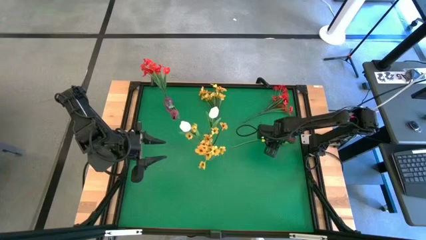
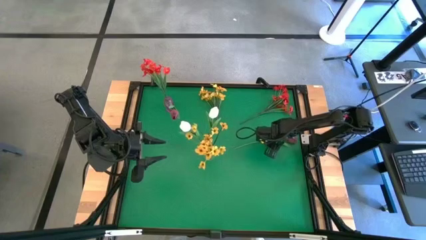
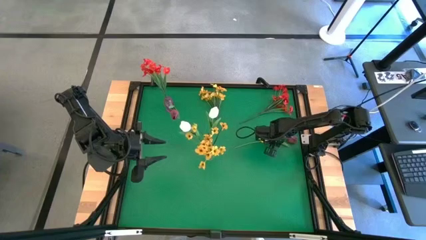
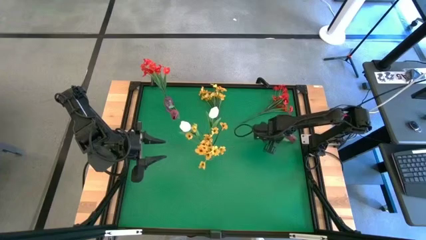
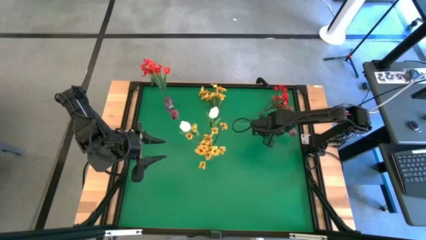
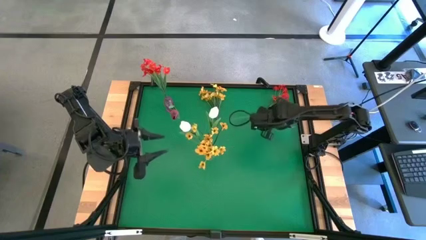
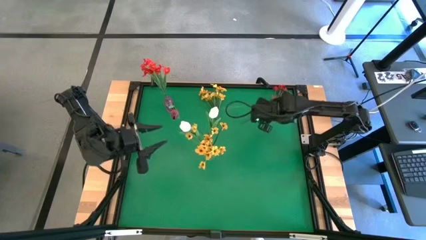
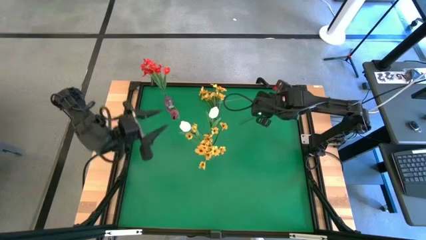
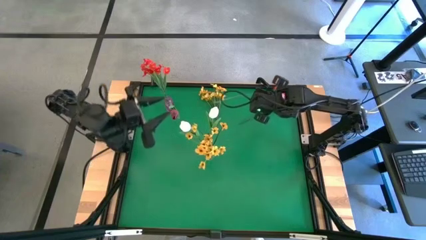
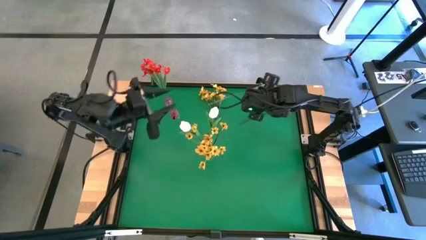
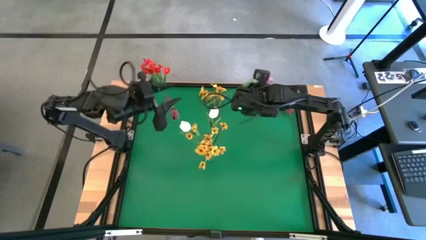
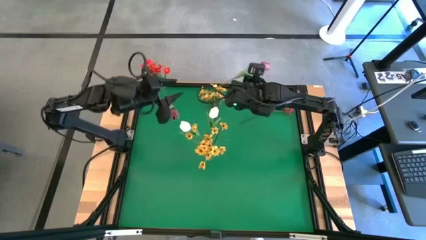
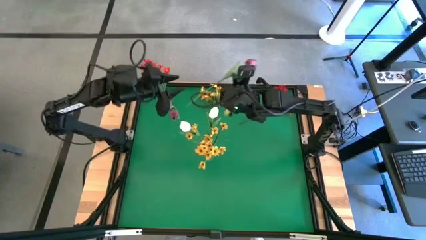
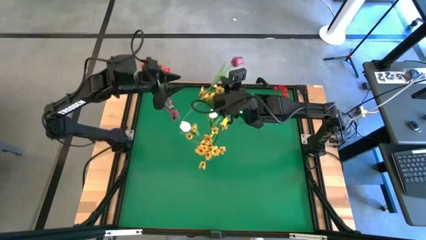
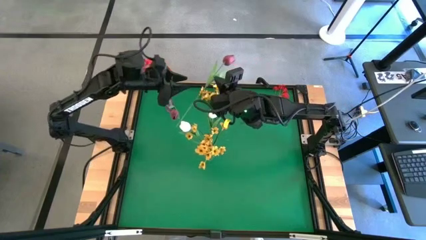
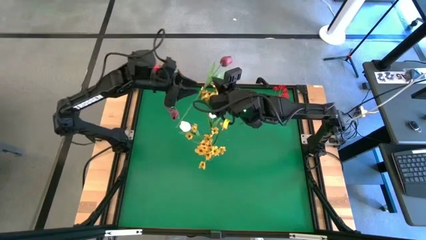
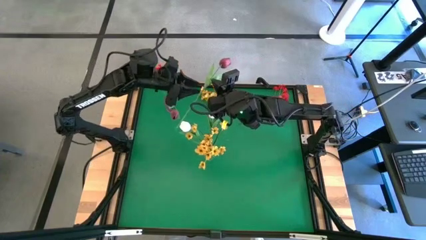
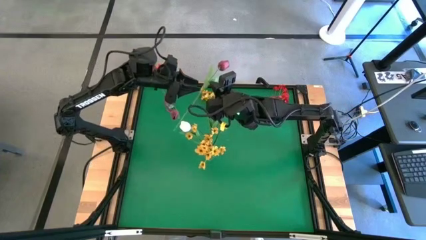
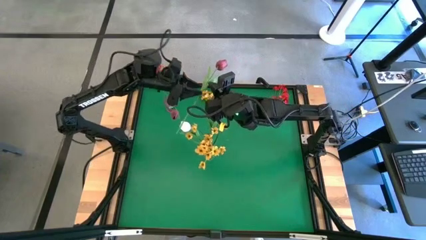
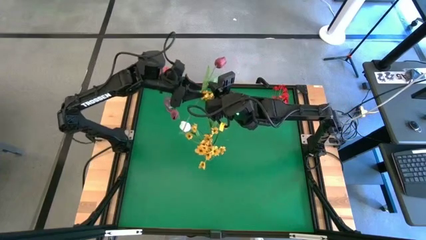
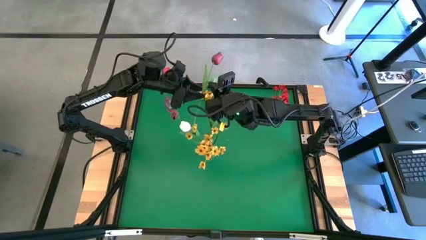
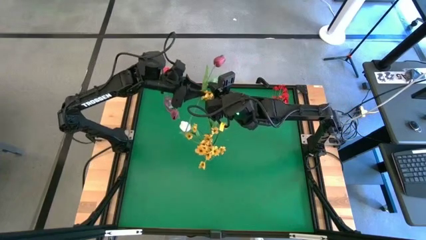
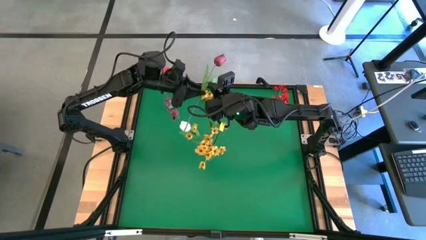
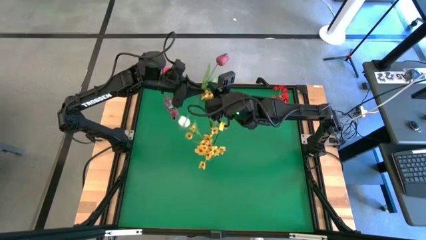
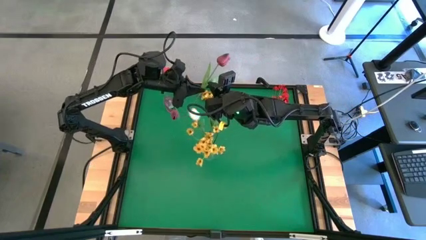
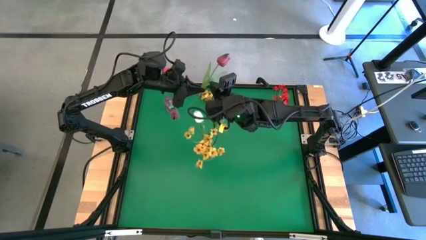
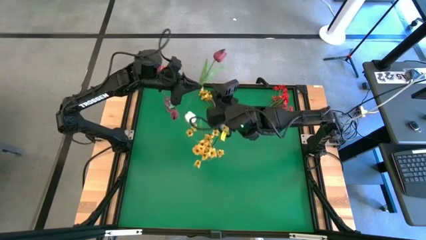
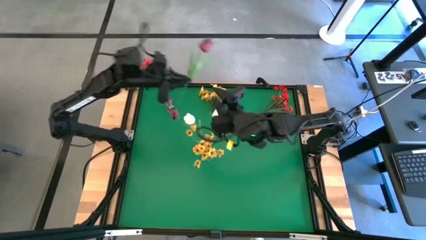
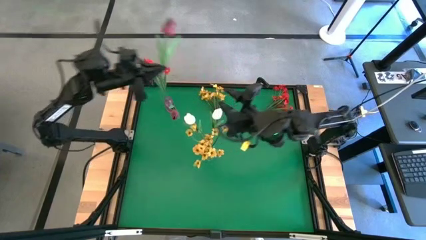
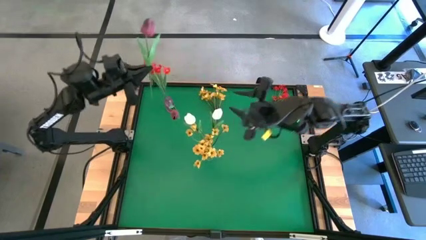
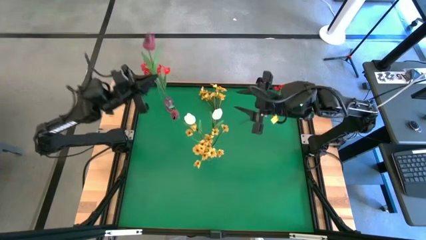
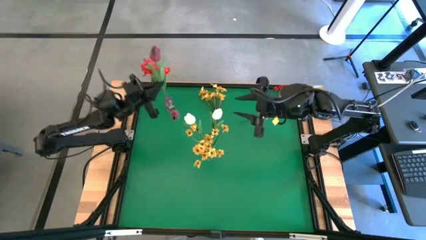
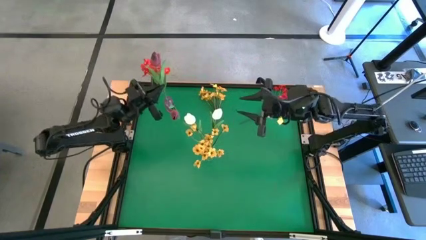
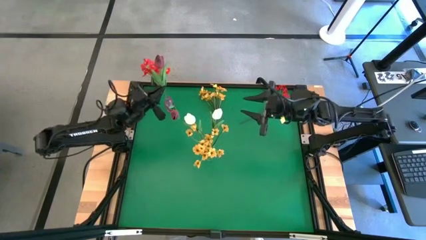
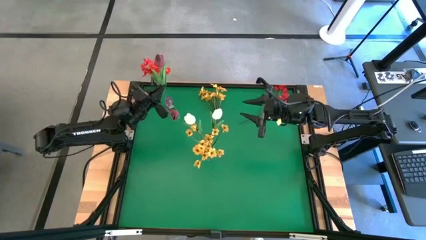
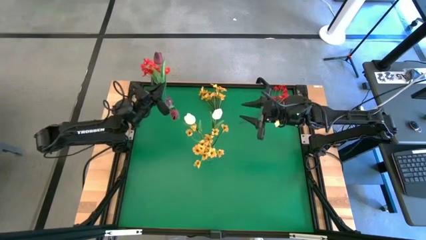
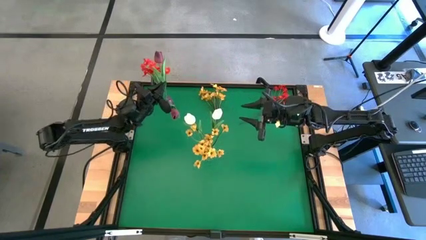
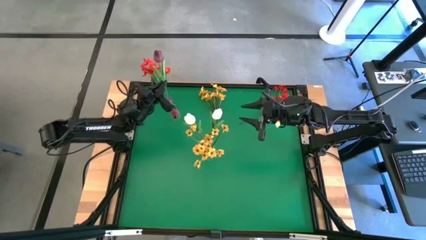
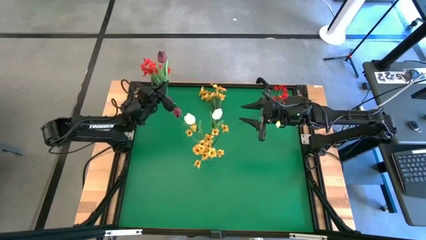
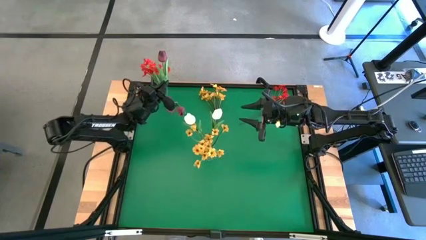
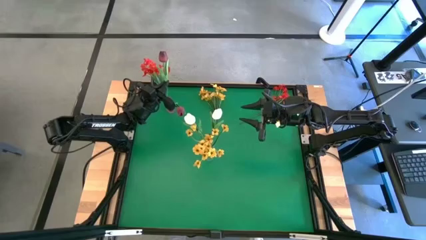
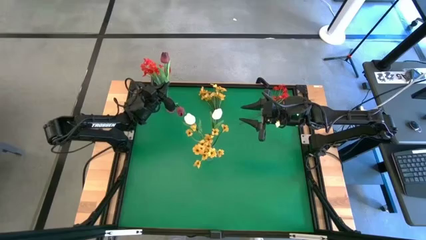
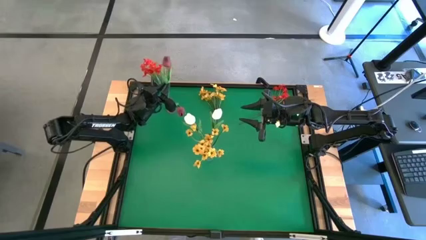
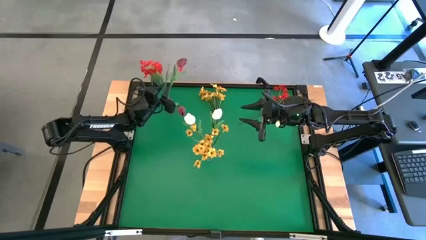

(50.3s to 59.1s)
Task: Sort flowers into vase by color
Put the red tulip into the pink vase

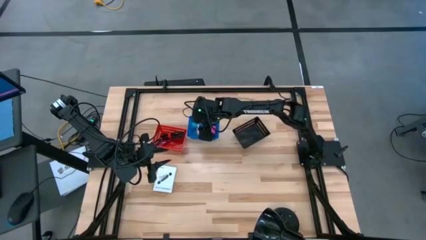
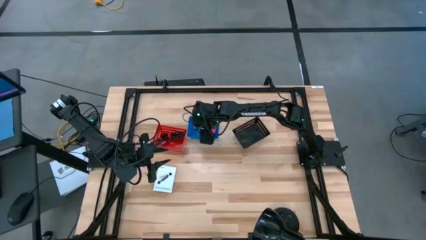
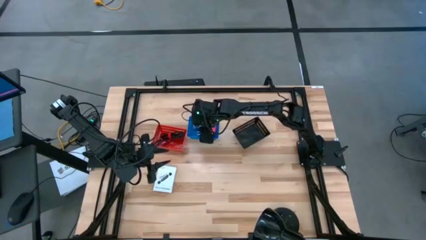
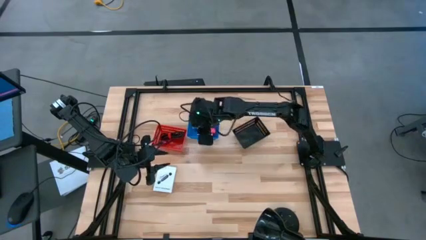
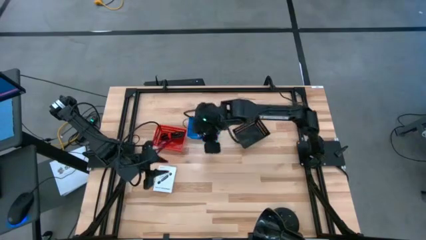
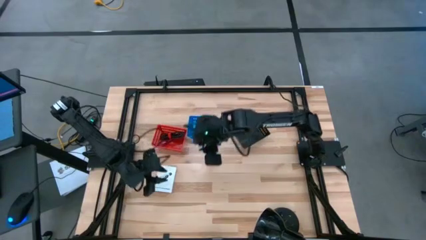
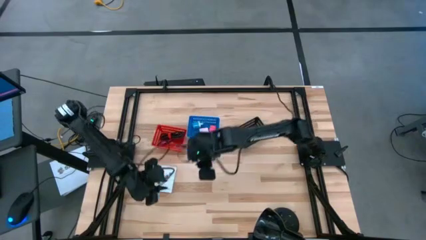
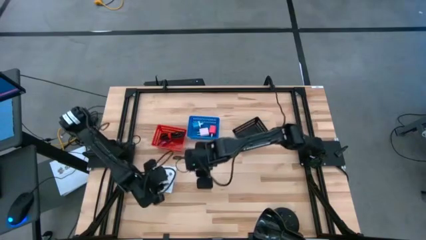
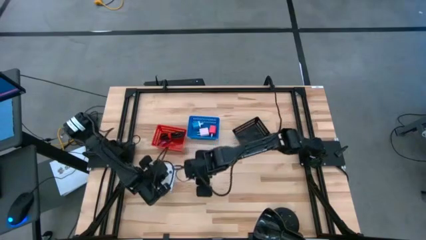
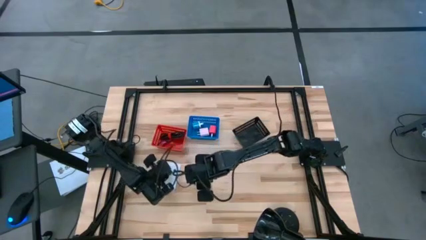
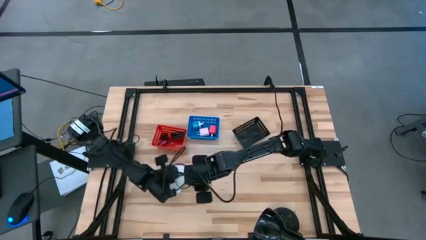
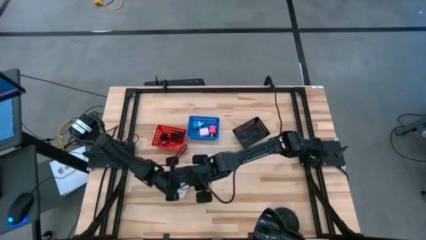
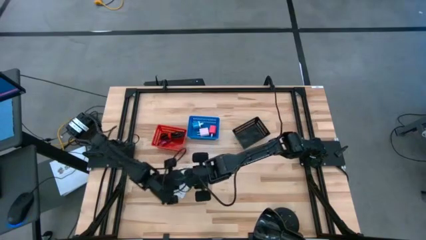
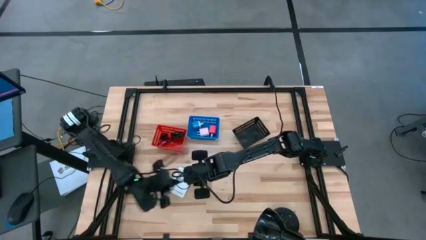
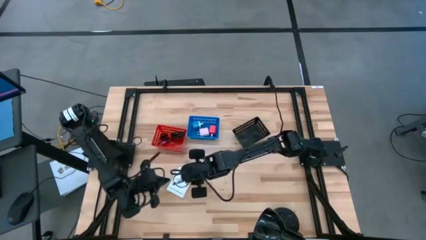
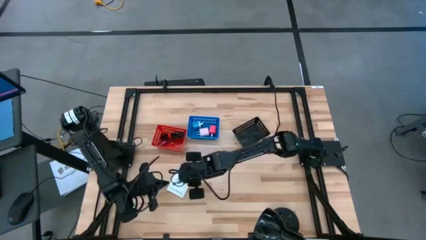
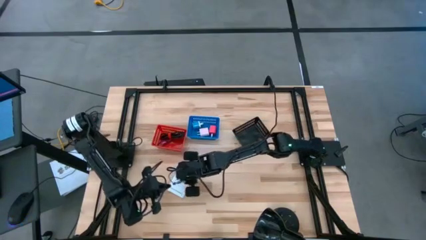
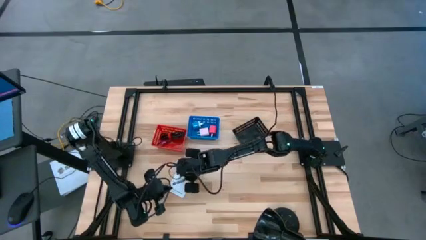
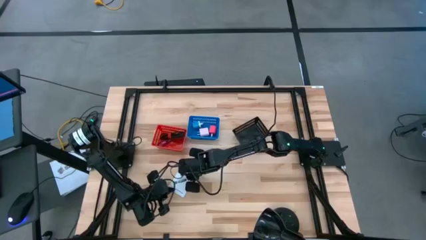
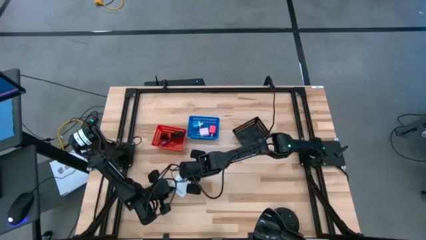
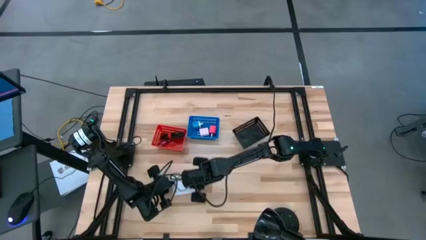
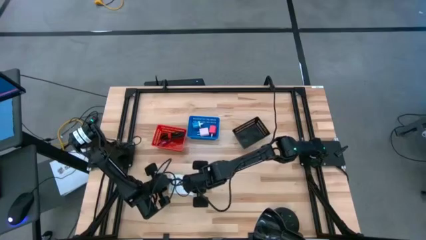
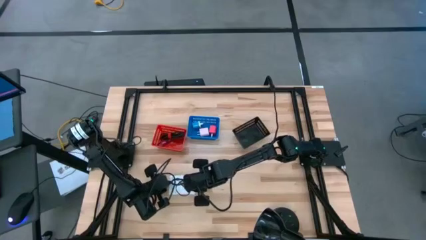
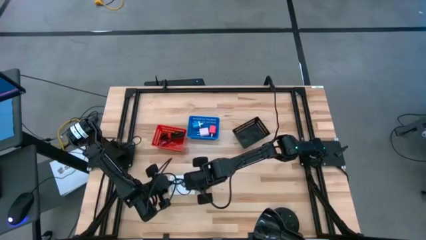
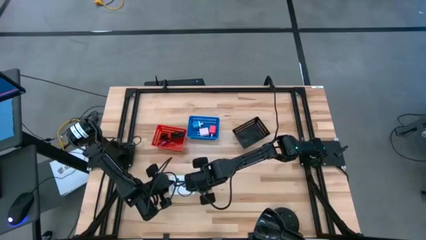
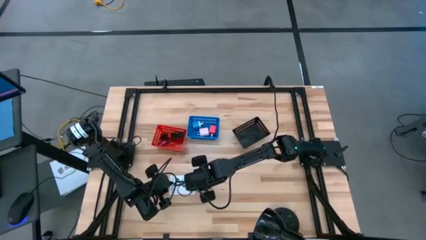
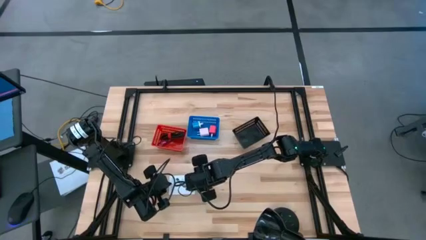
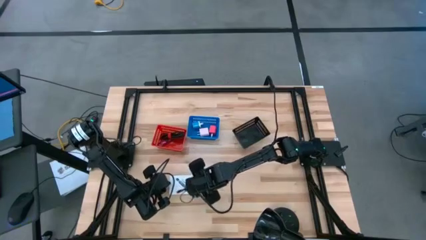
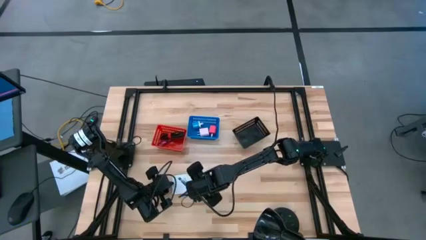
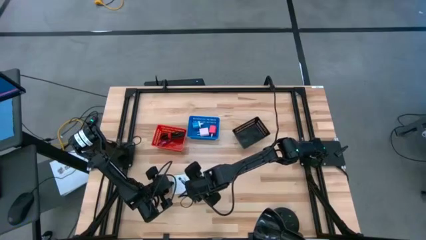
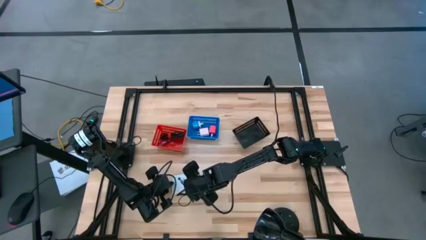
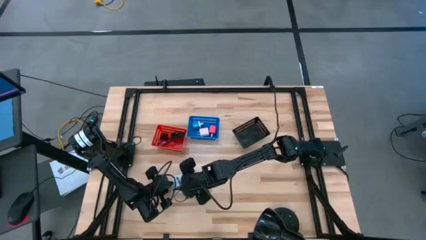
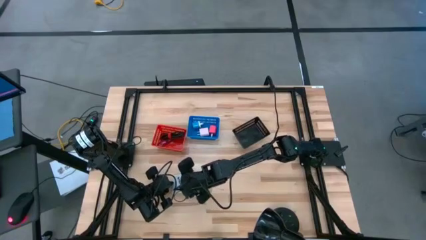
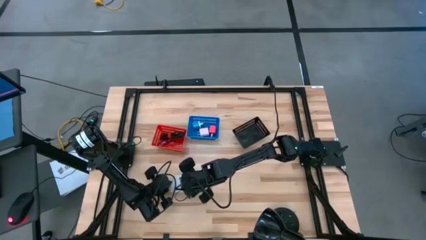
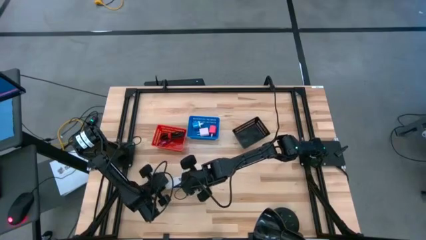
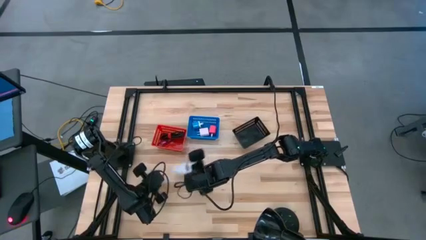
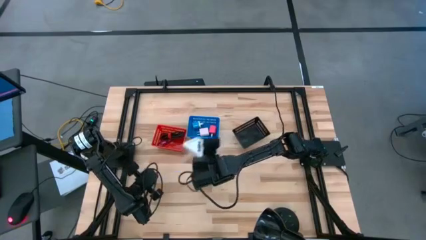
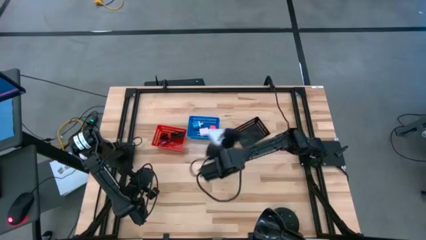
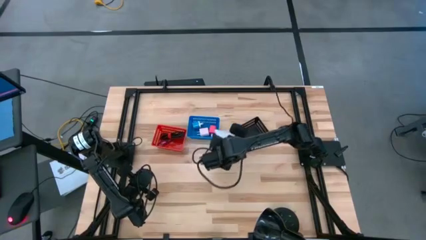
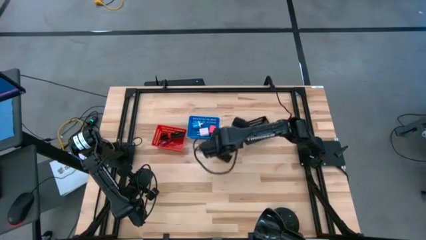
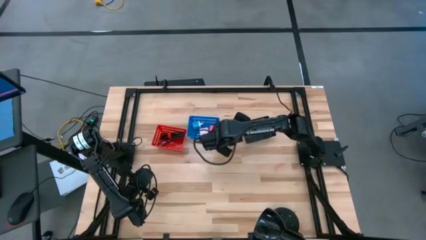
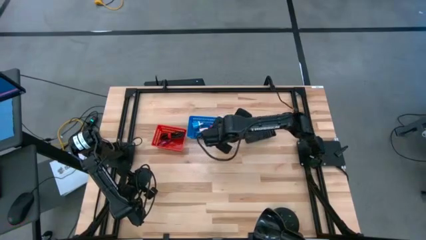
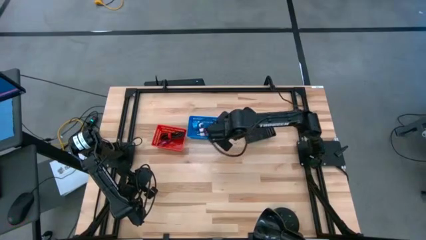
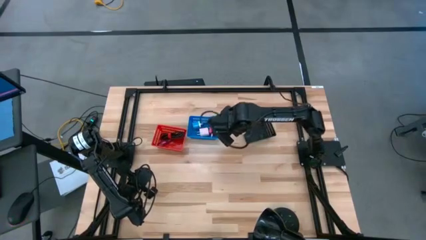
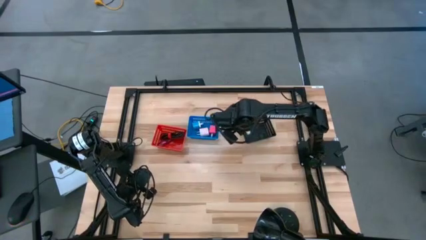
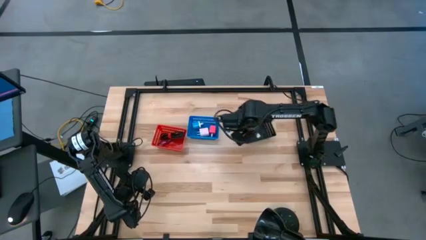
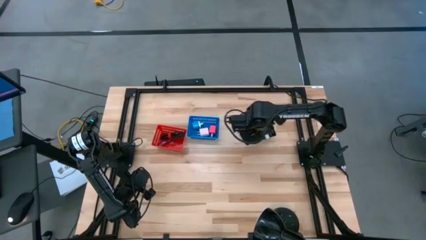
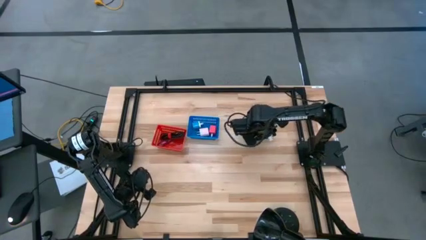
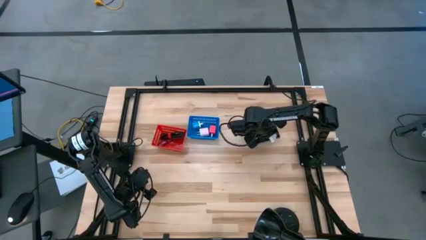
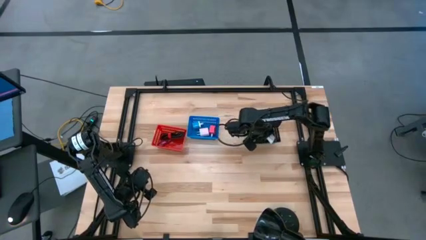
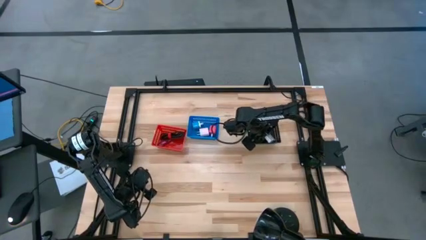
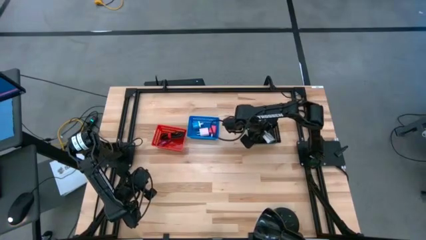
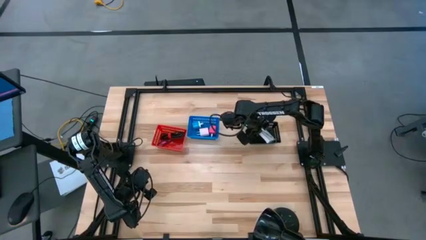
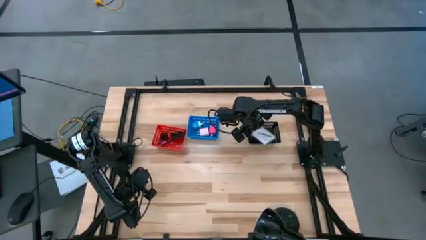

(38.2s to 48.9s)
Task: Pick and place items into bin
Put the card reader box into the black bin
